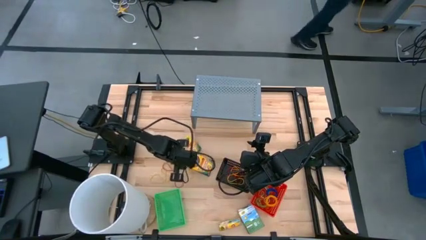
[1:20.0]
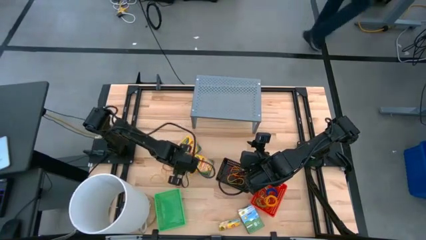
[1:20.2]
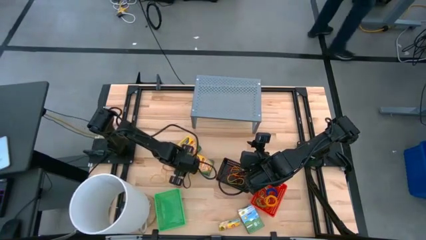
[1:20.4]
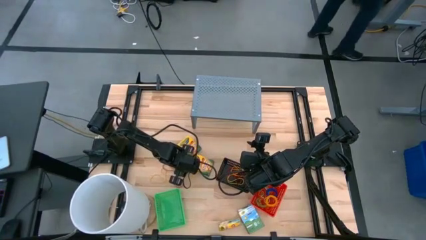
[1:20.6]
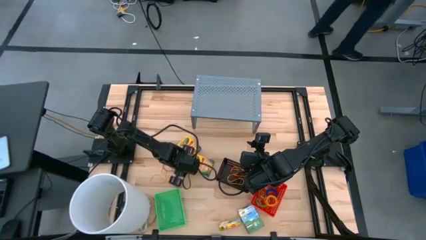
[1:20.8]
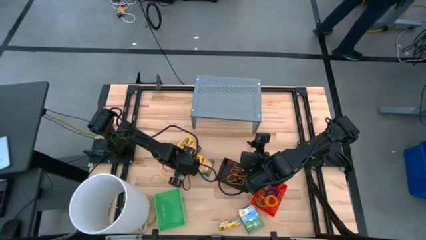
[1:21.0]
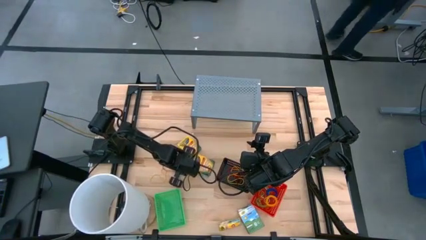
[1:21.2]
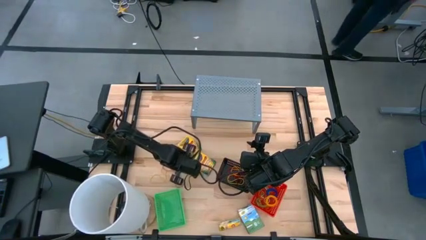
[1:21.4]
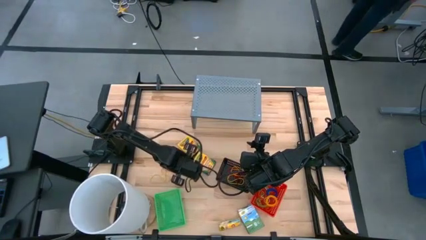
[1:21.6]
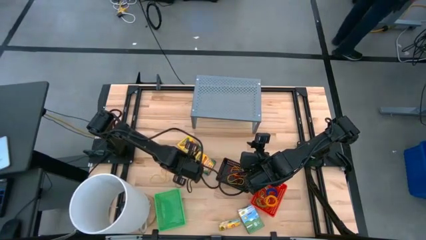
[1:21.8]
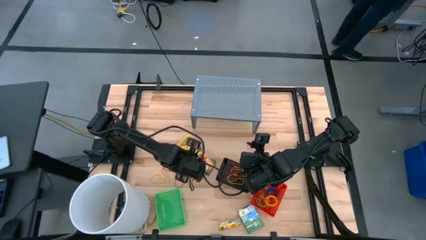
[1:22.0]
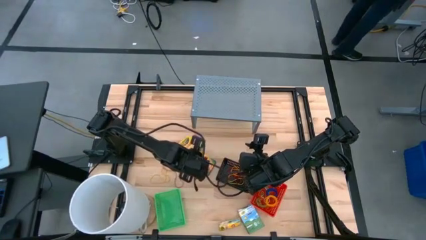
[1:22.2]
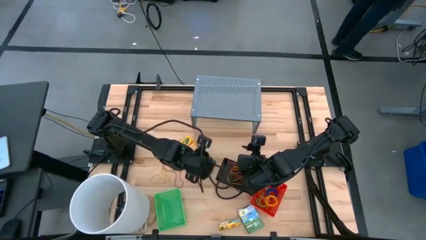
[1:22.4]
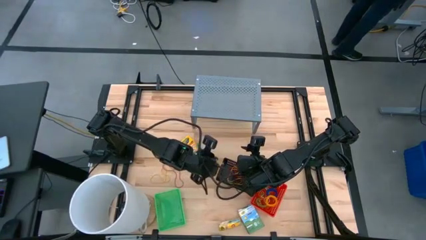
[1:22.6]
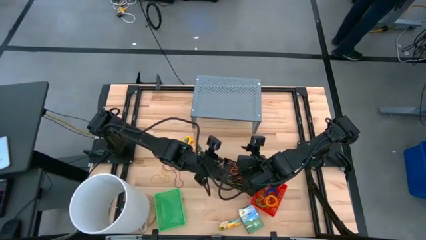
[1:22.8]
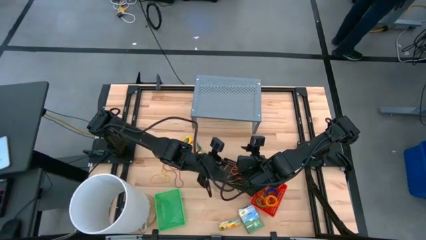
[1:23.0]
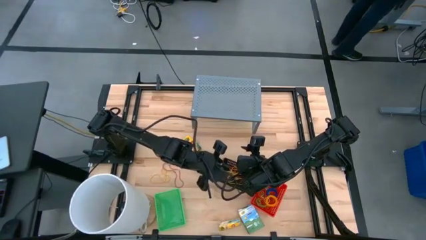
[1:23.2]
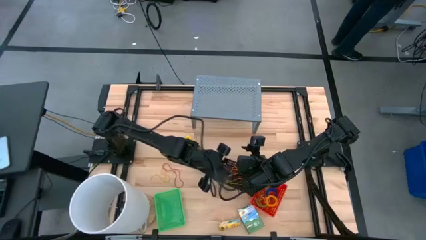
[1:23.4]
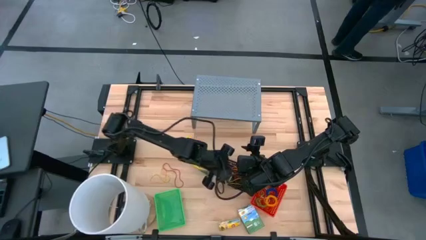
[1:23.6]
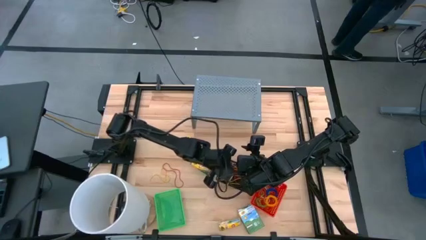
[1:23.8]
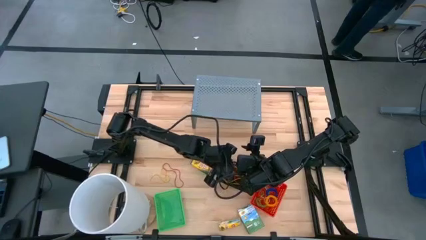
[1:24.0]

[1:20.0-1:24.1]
Task: Pick & Place Office Desk Supplies
Put the yellow rubber band into the black bin

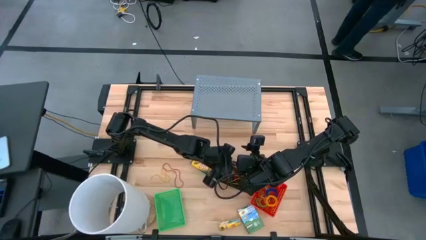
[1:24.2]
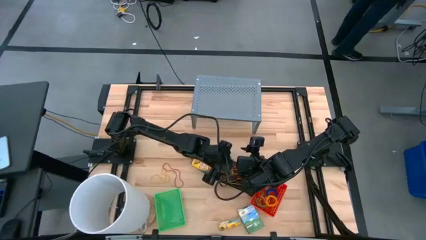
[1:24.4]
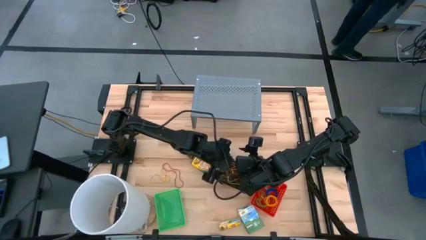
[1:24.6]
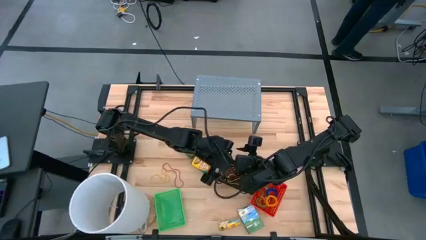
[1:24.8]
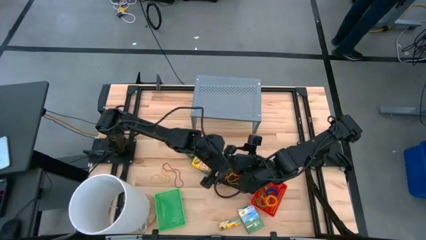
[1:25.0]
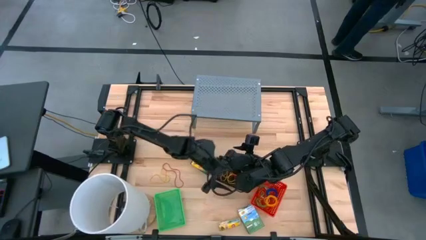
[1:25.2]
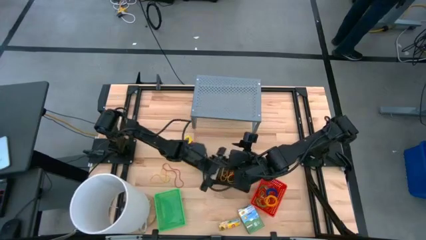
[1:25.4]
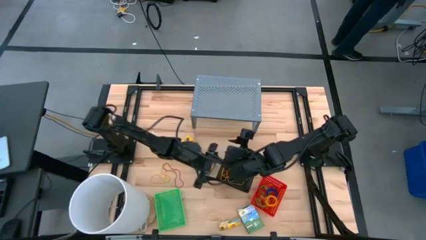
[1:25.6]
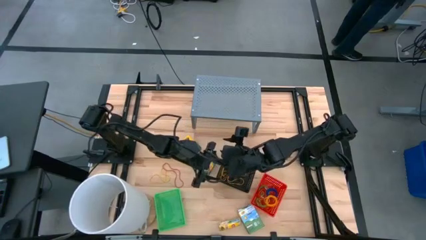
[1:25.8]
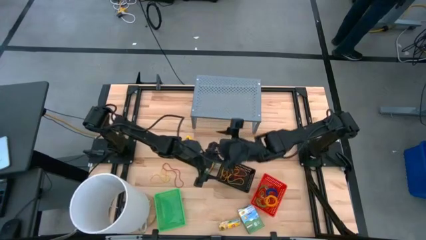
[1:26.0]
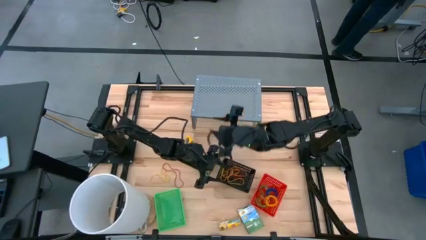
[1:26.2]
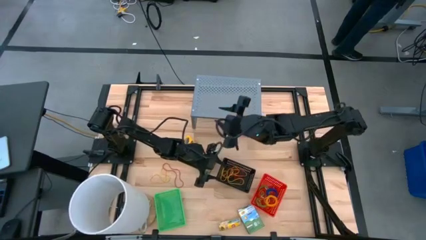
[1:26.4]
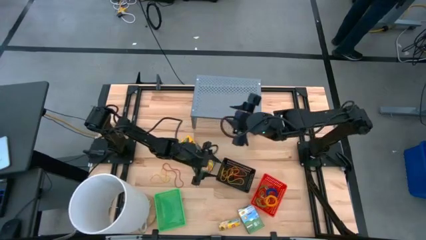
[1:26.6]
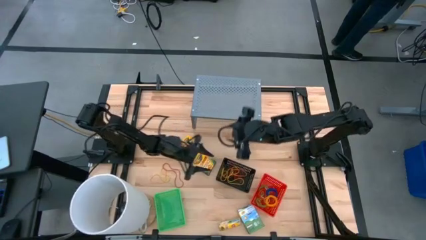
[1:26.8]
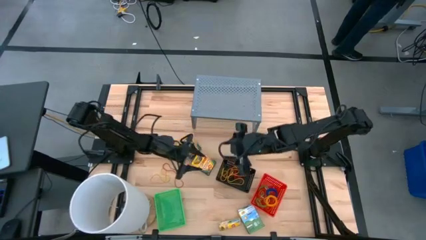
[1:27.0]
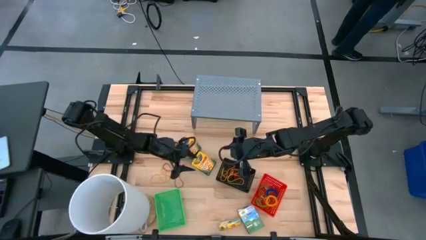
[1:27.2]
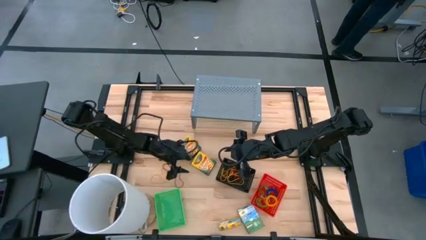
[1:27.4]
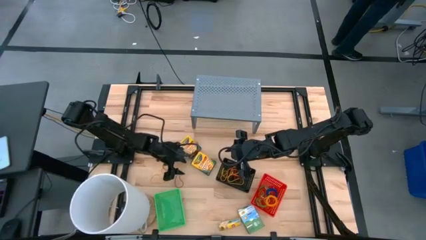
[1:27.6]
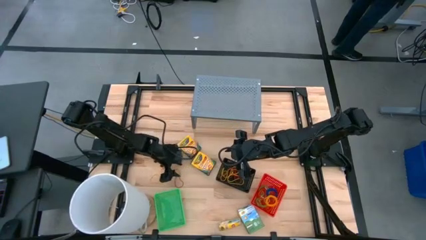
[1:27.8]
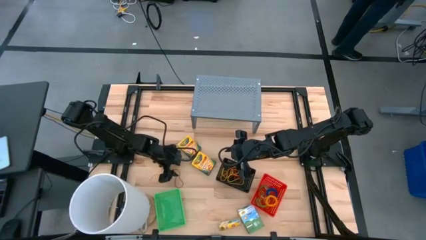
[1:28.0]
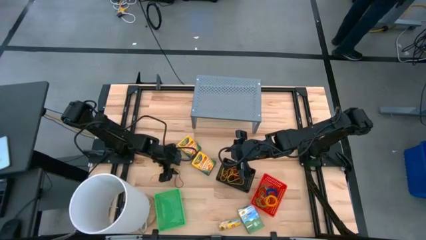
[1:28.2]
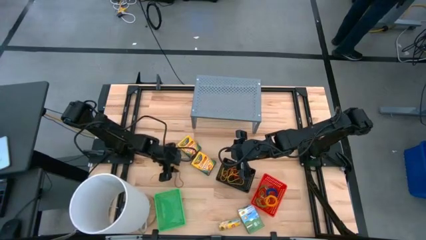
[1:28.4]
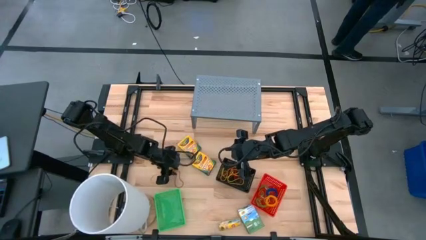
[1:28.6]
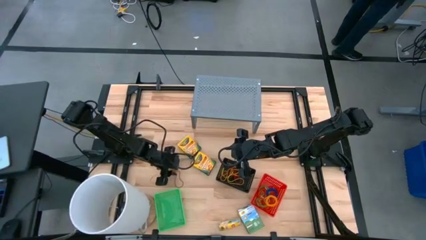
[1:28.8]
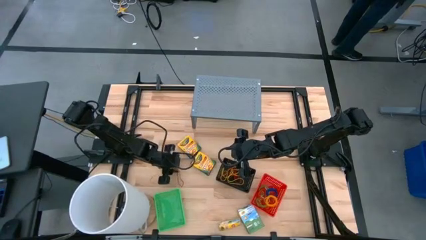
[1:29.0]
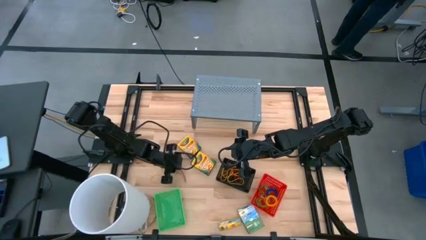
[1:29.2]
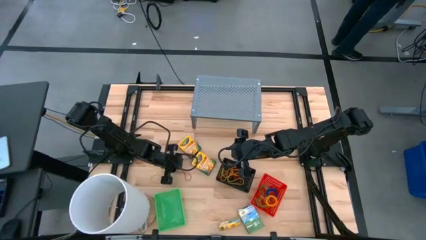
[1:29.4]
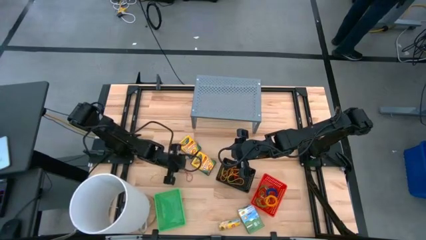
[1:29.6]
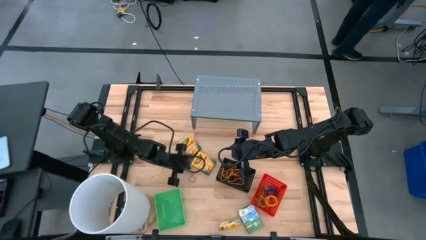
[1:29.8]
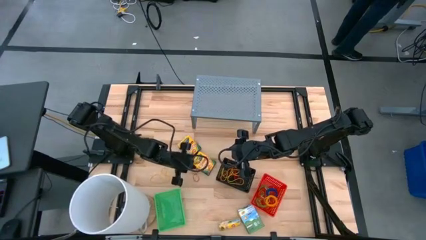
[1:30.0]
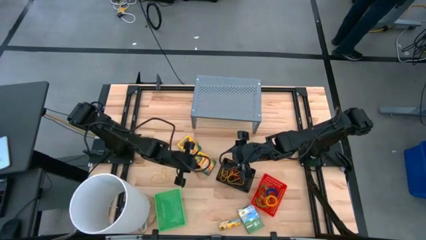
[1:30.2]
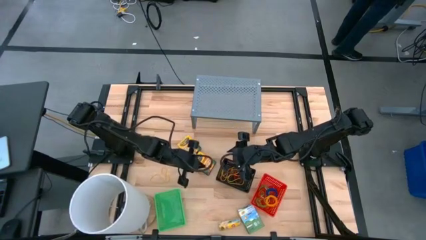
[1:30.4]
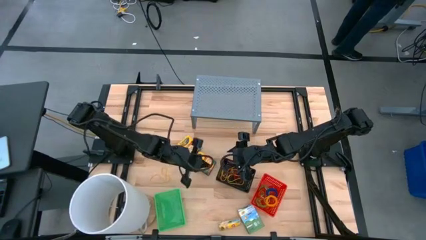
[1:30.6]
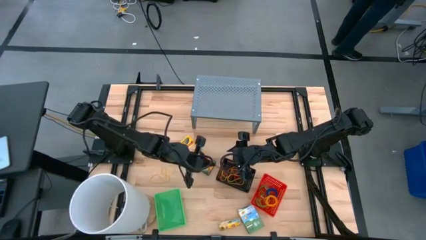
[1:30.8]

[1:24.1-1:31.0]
Put the red rubber band into the black bin

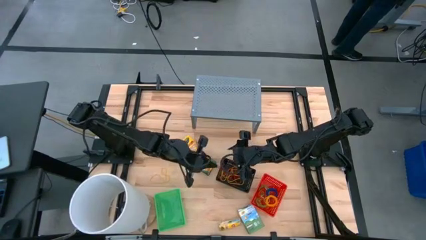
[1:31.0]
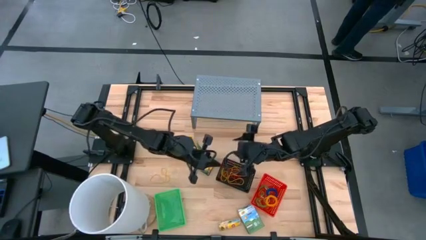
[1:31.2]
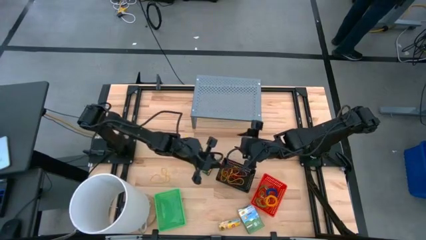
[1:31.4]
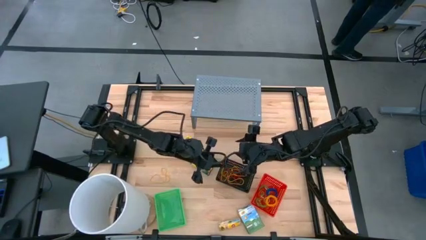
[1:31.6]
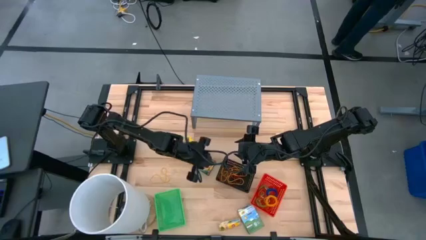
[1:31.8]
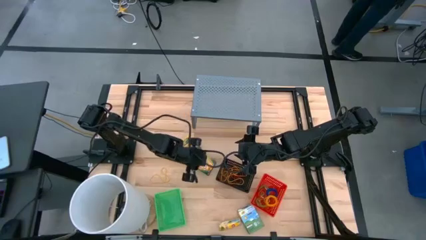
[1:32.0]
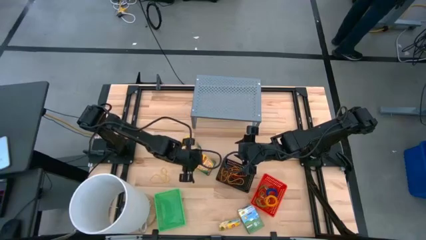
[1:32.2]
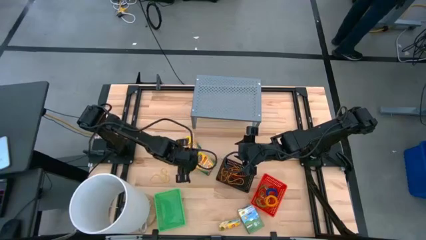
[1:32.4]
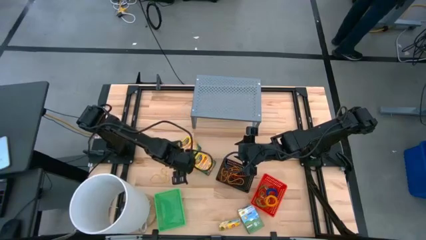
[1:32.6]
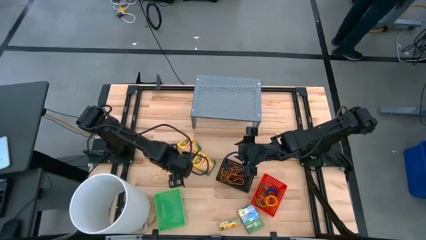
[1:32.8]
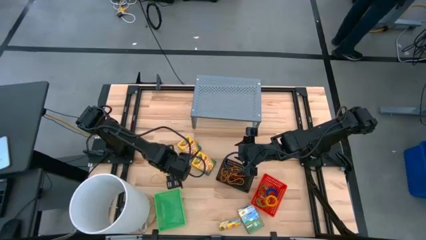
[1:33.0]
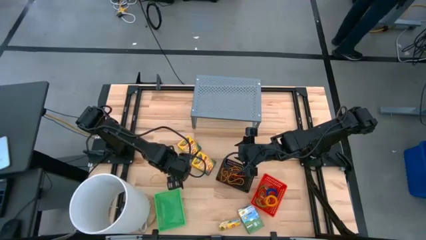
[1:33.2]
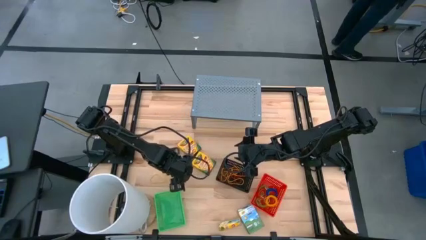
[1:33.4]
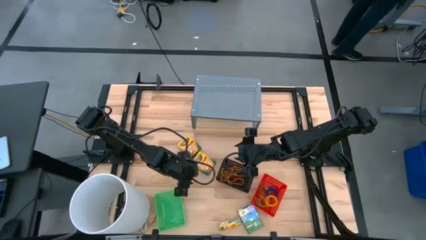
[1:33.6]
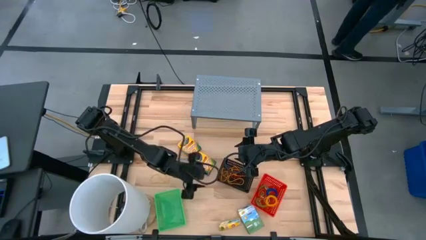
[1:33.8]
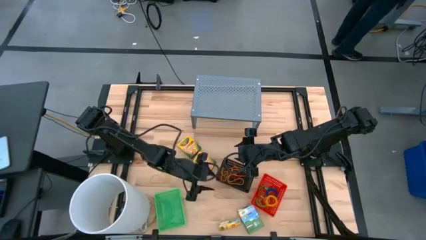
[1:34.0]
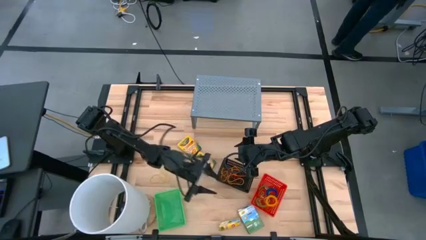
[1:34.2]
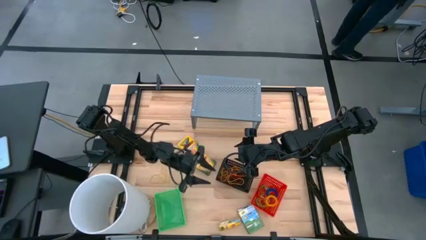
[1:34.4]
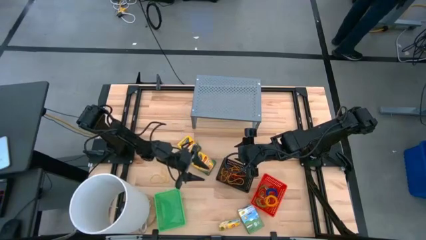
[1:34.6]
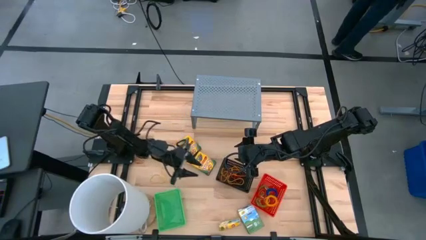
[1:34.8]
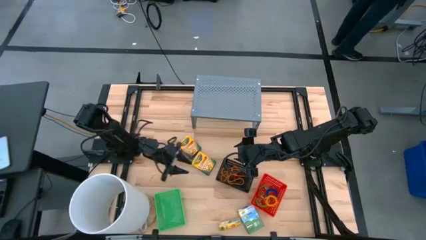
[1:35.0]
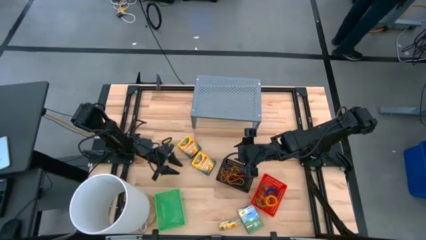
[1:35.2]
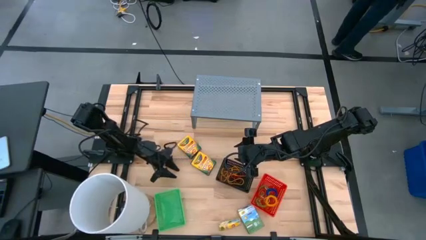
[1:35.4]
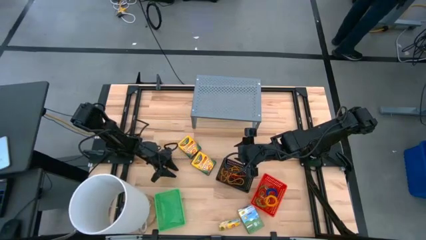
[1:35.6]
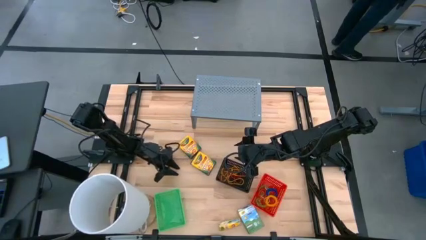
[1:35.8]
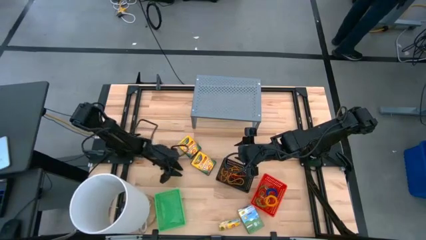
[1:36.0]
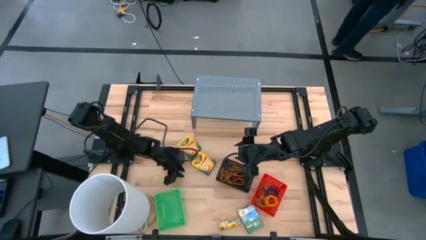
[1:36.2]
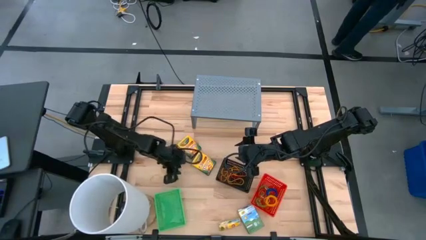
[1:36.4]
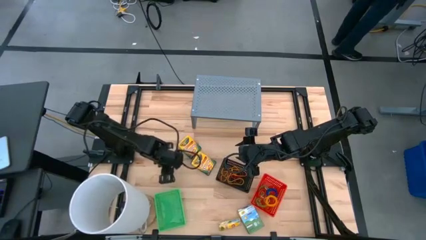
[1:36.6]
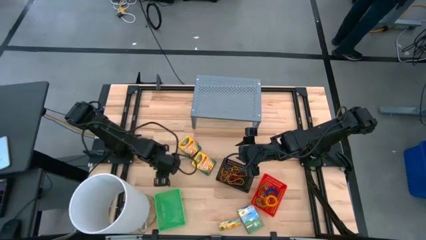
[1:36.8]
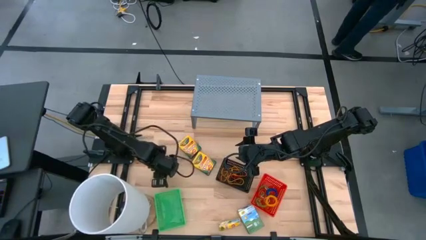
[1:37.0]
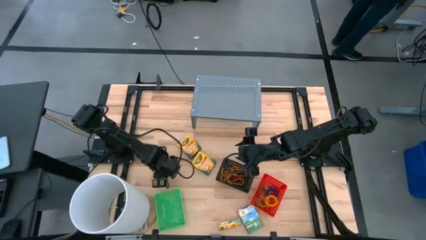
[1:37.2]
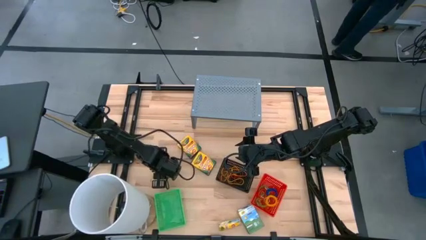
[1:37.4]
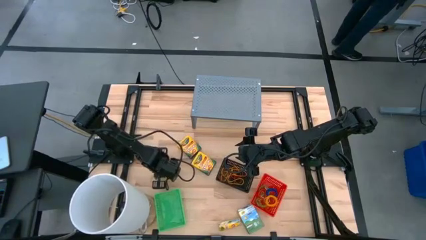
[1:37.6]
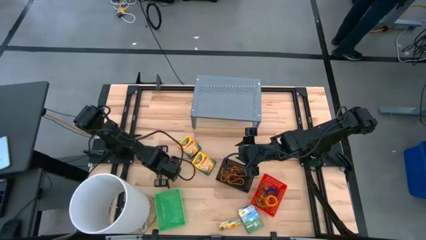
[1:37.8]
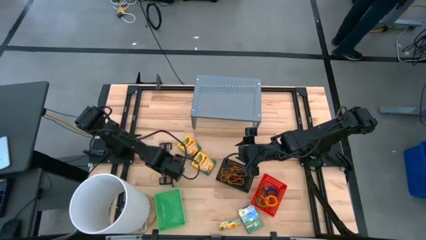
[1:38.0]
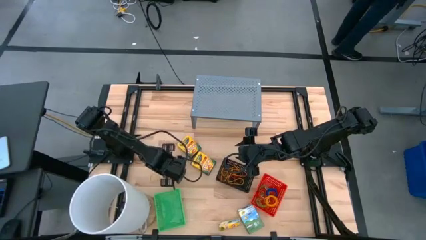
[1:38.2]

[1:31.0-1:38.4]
Put the yellow rubber band into the black bin
